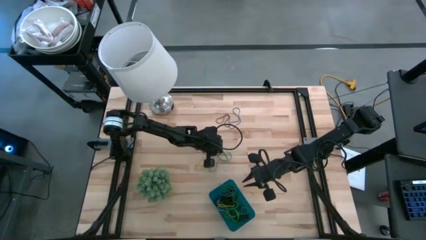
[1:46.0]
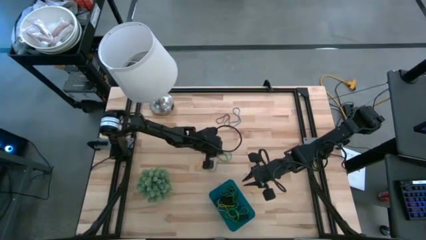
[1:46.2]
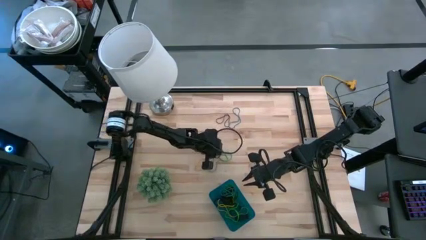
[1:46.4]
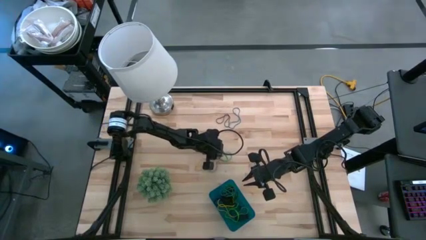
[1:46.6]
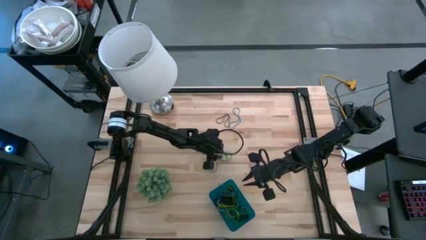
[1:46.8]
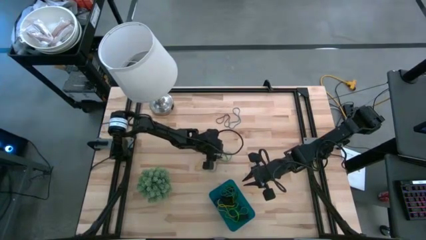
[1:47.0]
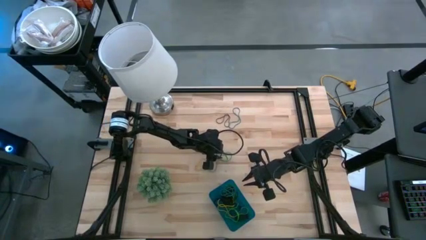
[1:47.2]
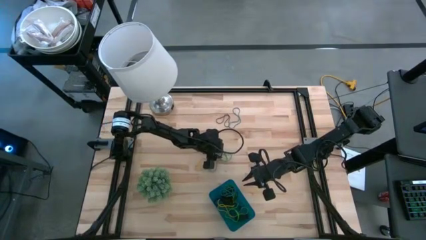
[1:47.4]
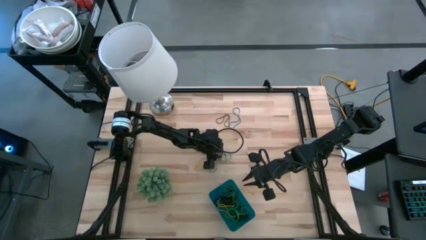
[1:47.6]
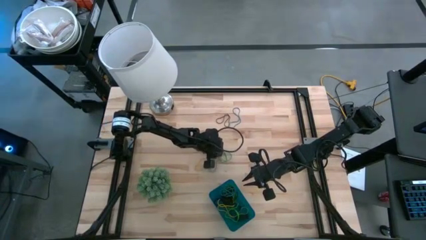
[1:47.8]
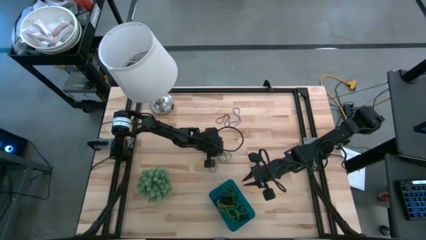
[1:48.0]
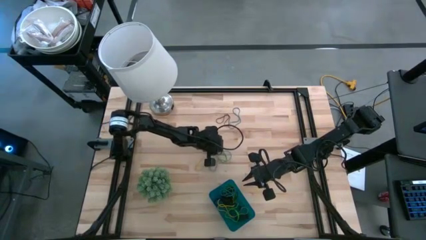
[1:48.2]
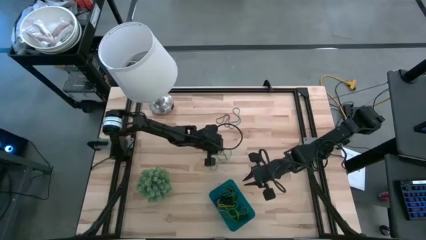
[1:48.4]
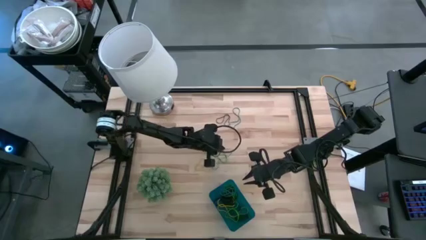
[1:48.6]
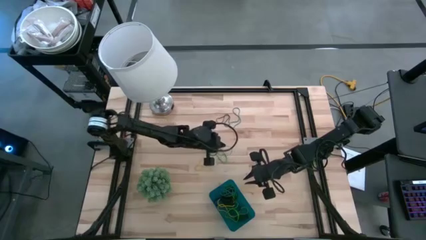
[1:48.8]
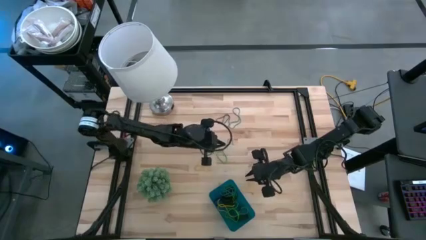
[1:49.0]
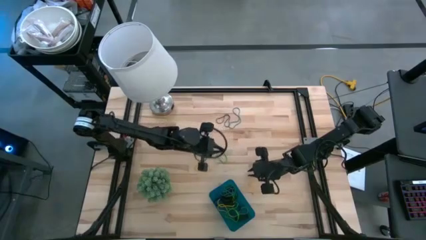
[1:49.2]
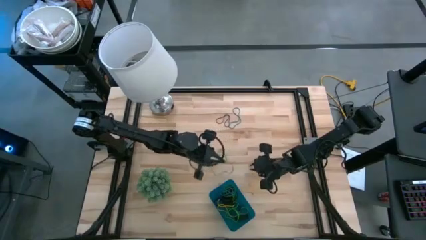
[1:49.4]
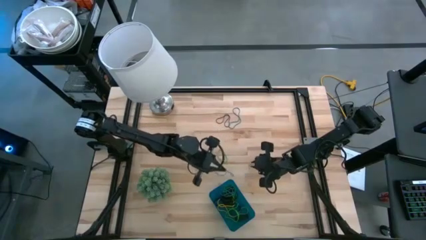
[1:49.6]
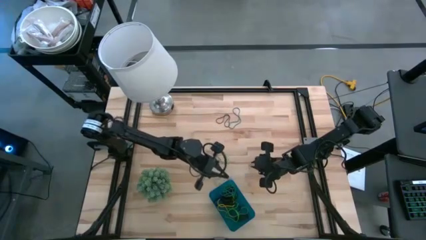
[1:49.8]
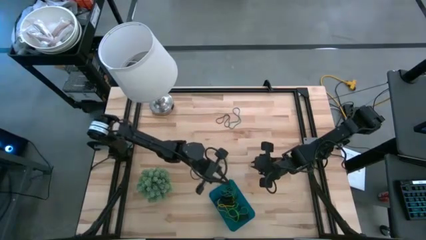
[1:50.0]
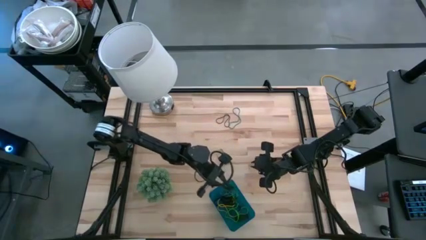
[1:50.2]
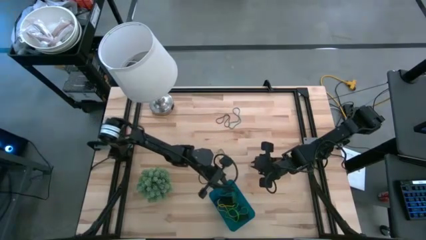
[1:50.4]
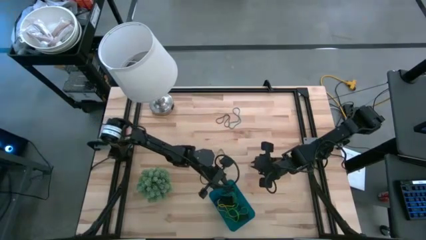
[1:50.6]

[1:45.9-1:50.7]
Task: Pick and place rubber bands into bin
Put the blue rubber band into the blue bin

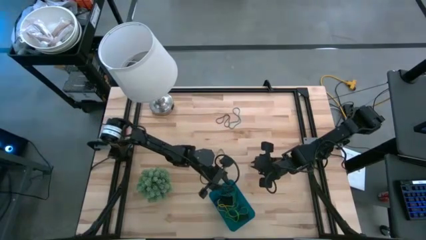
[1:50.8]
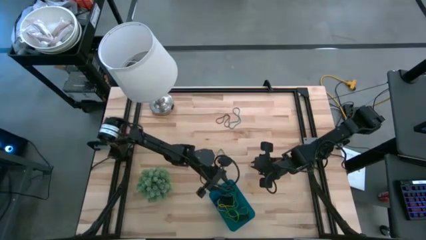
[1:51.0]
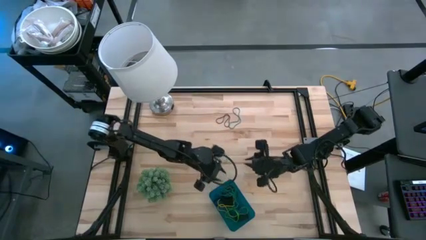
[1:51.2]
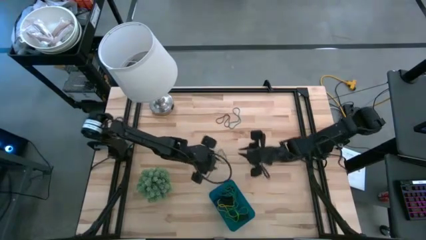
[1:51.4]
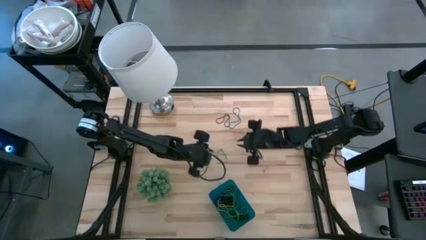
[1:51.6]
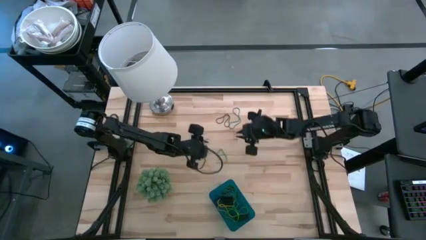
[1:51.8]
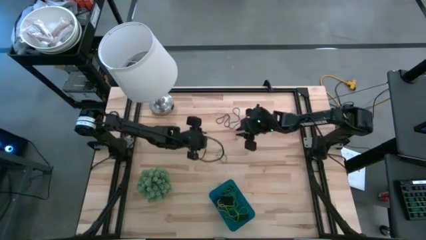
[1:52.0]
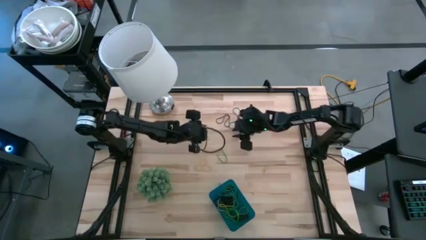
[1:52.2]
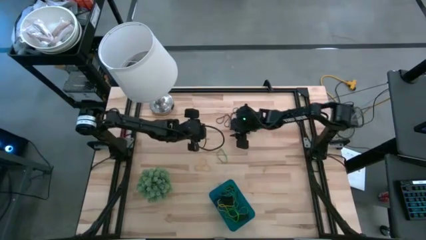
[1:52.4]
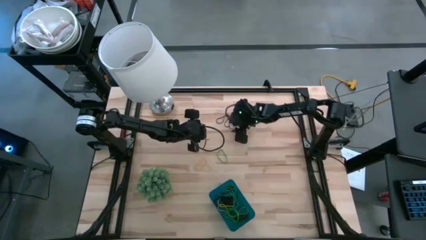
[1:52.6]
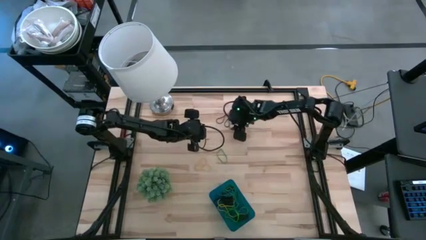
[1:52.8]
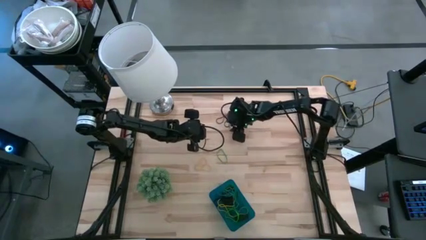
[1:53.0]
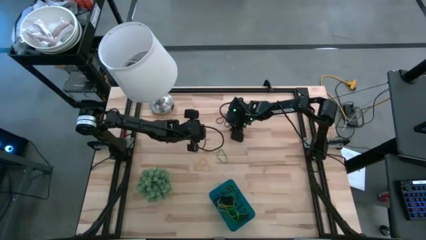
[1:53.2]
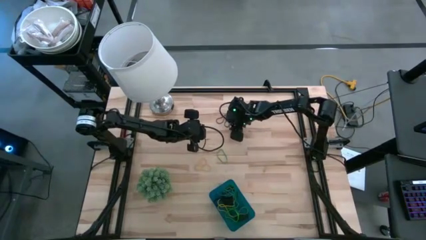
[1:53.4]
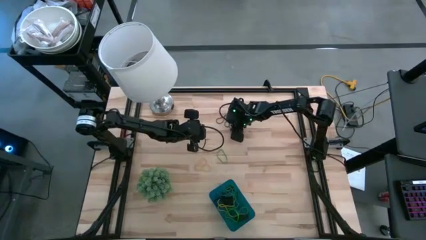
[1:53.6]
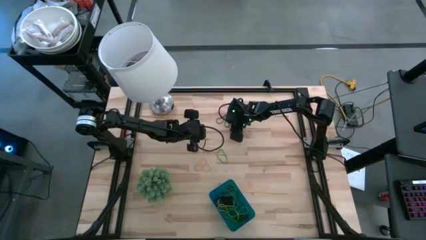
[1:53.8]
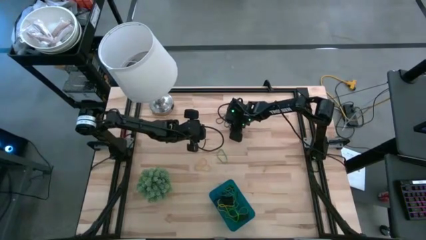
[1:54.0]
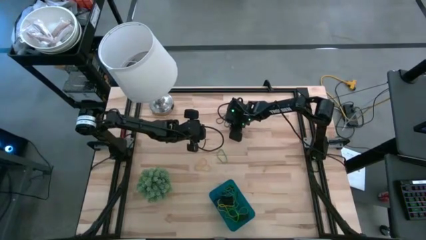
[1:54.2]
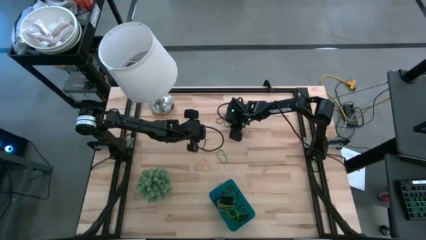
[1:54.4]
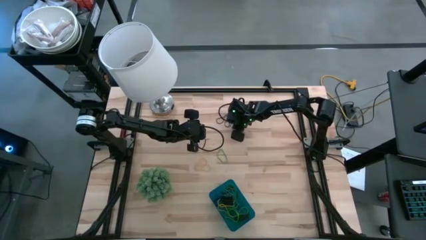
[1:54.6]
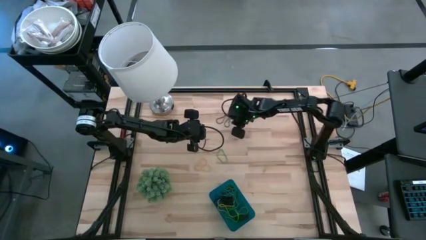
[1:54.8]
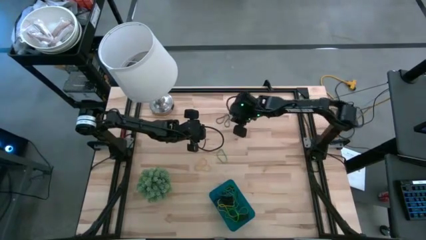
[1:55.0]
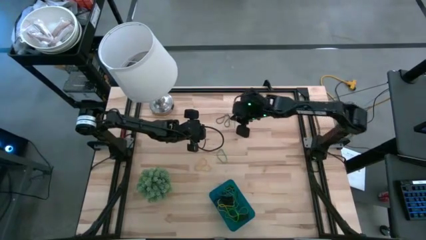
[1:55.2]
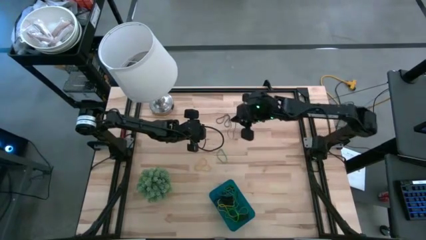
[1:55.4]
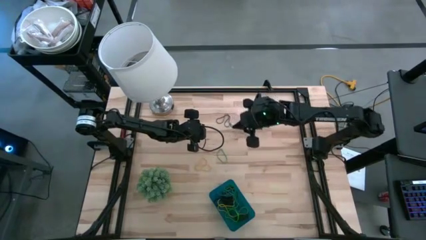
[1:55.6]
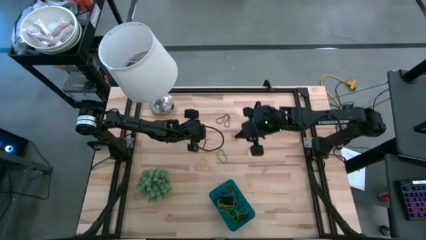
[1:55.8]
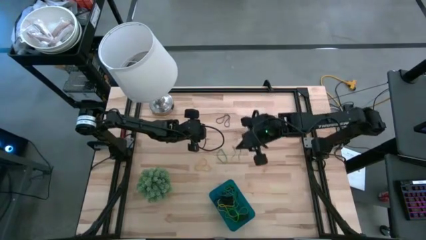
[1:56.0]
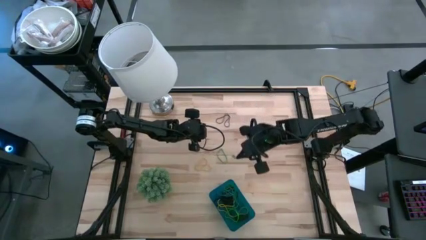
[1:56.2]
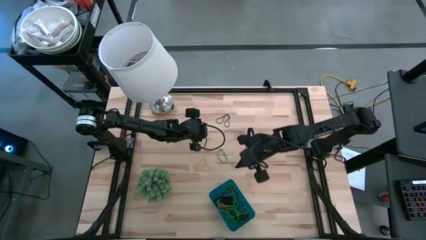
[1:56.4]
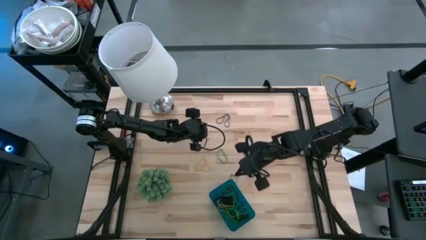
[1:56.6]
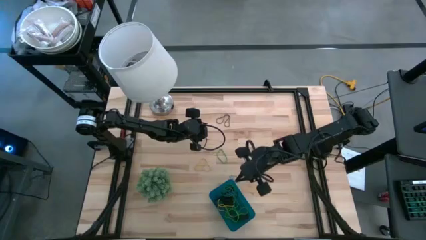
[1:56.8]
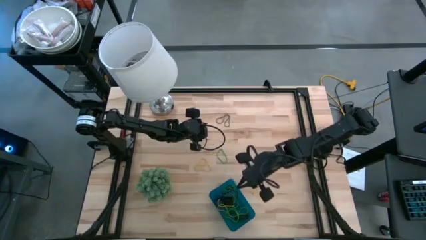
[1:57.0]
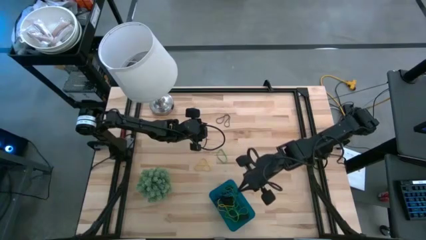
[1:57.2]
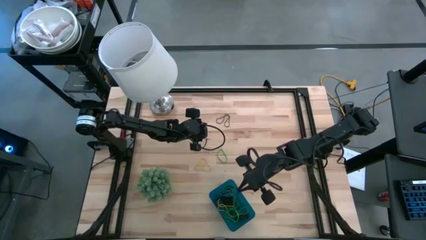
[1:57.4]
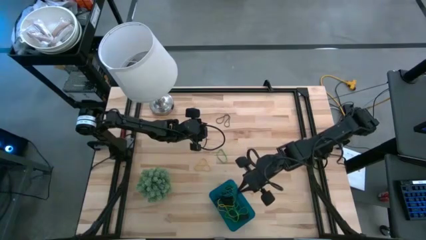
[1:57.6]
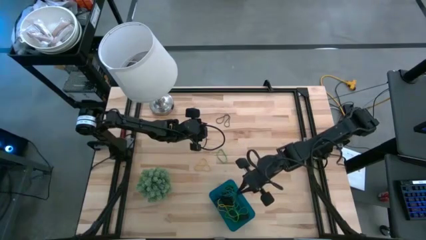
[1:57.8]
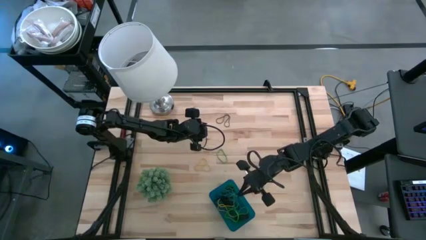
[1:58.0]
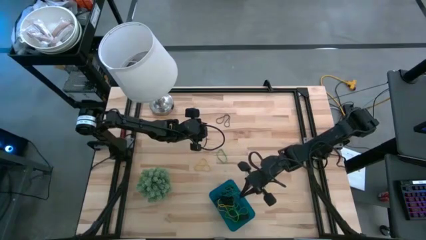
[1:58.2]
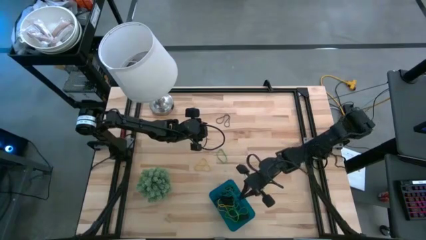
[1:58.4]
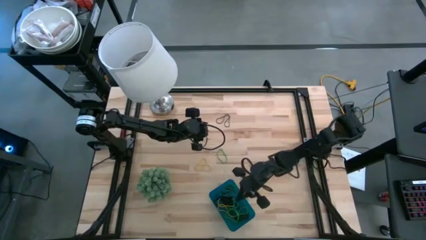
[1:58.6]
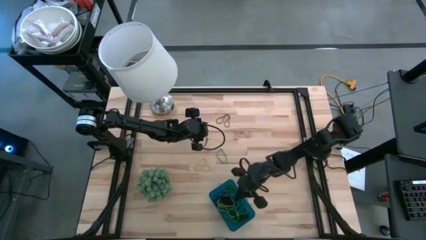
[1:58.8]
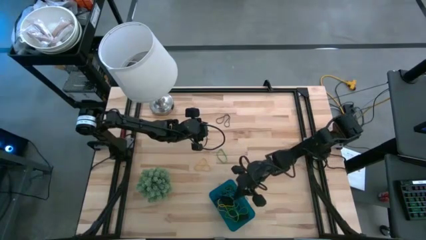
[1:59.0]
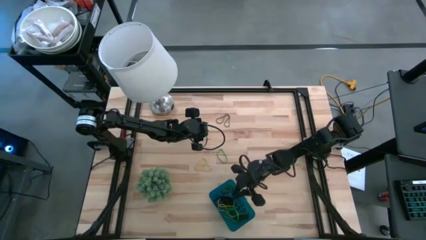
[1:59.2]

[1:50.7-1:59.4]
Put the blue rubber band into the blue bin

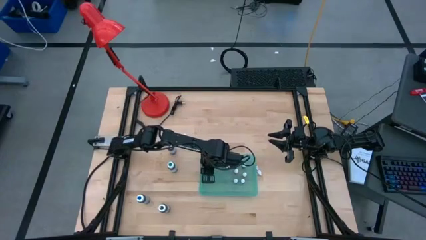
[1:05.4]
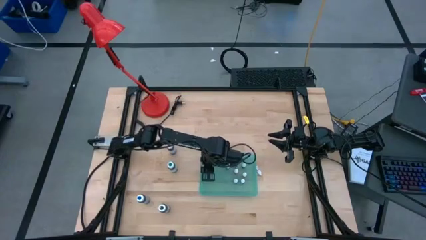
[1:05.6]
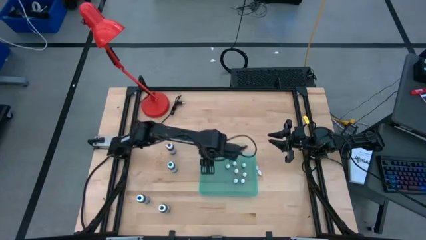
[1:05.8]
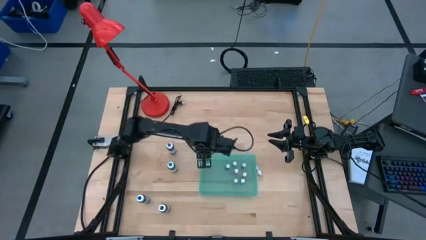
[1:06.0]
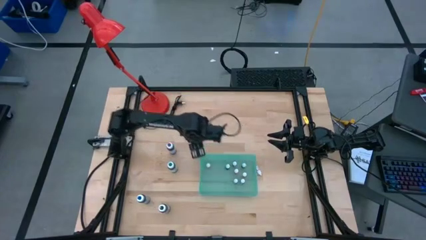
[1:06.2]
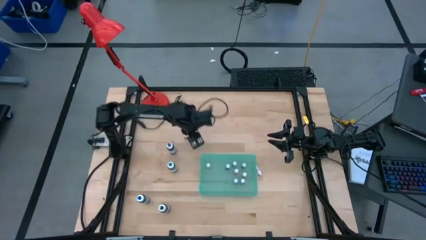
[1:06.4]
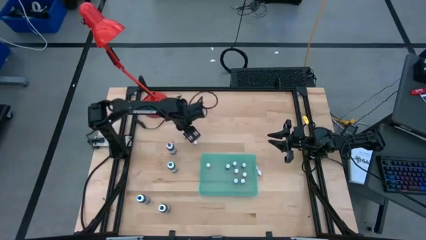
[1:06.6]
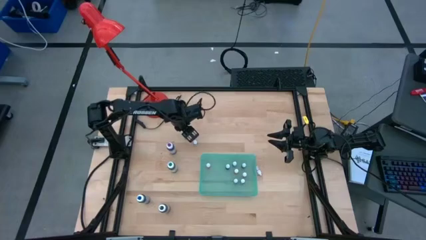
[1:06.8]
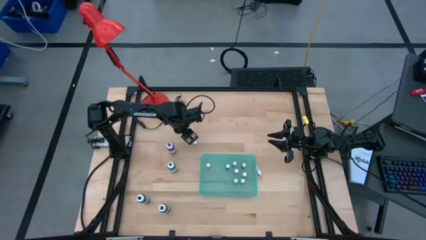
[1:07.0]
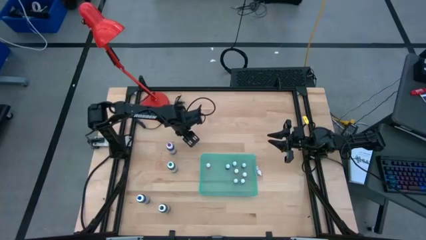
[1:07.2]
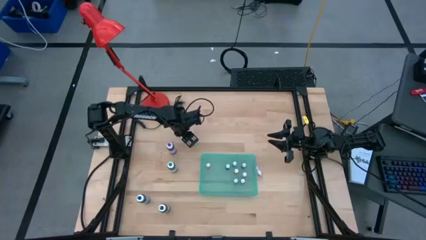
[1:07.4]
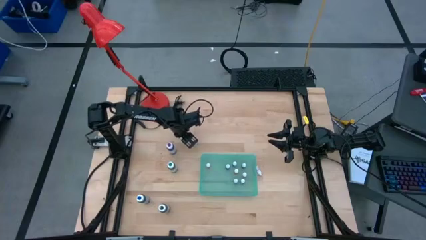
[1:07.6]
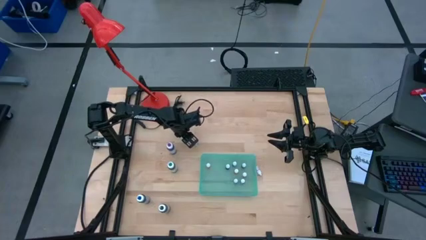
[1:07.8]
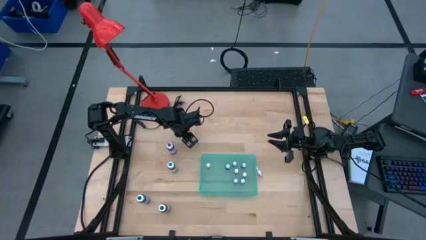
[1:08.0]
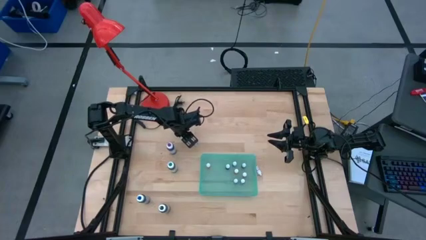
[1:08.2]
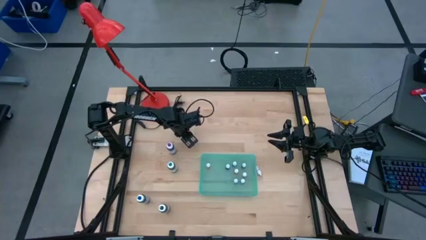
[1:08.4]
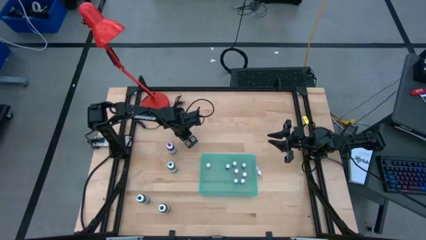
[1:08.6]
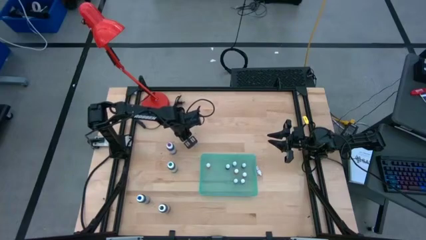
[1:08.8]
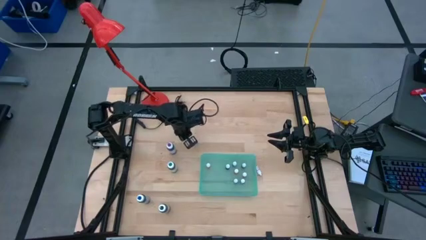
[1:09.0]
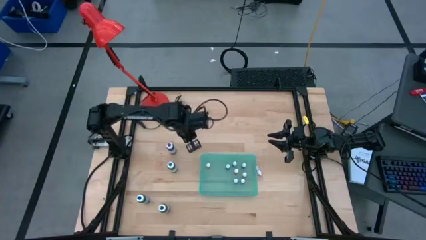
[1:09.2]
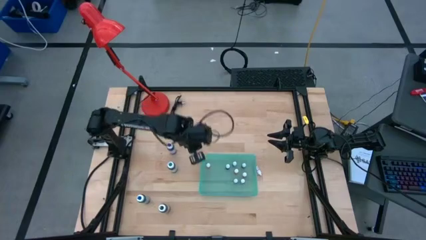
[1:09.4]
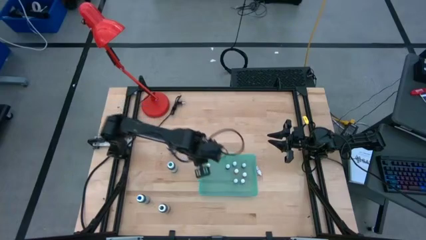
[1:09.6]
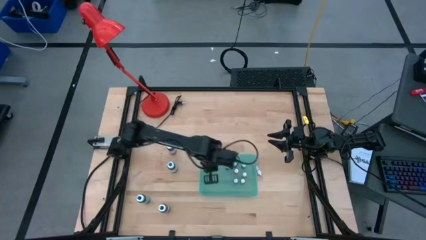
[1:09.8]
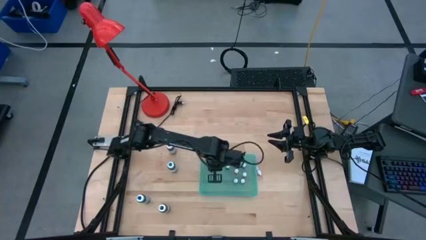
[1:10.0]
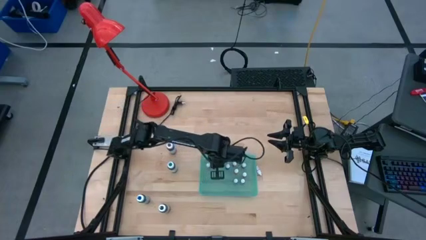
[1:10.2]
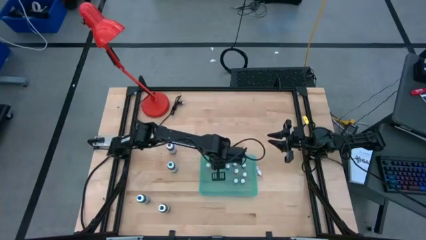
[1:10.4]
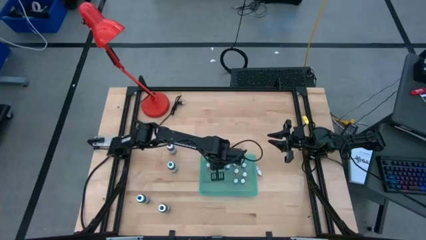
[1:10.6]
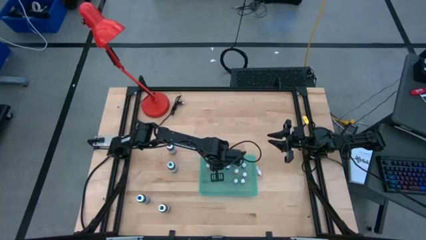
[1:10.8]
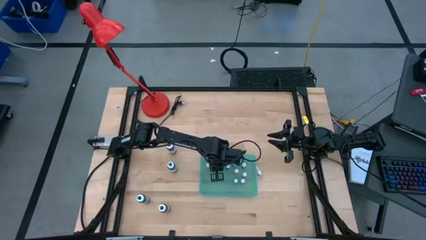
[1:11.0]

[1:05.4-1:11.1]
Task: Pick & Place food coloring
Put the small orange food coloring bottle into the green bin
